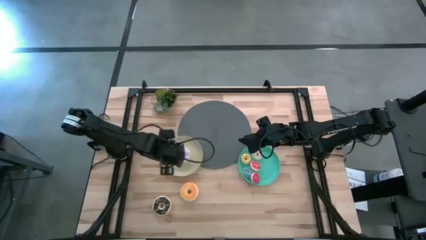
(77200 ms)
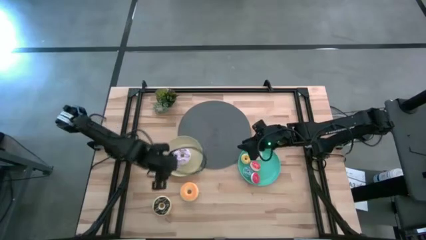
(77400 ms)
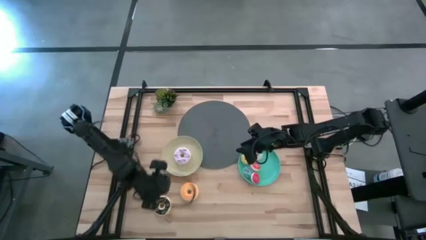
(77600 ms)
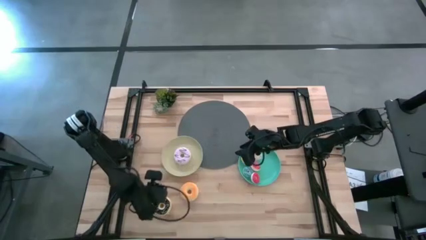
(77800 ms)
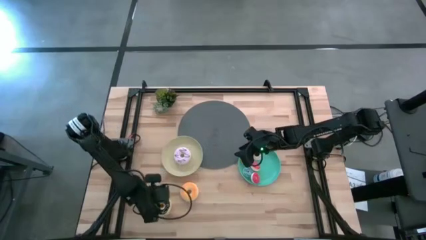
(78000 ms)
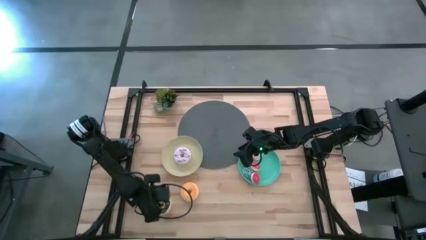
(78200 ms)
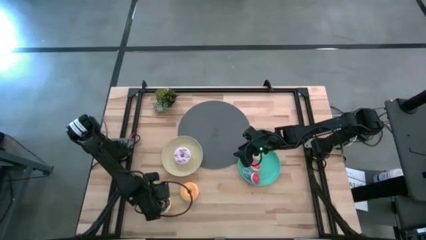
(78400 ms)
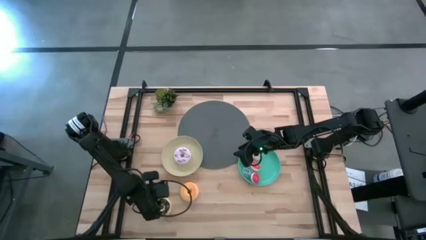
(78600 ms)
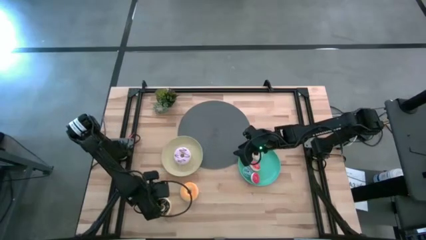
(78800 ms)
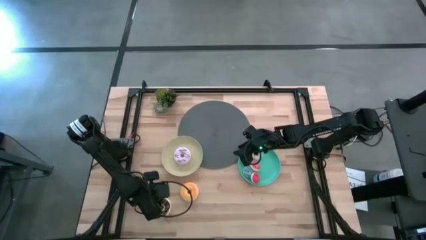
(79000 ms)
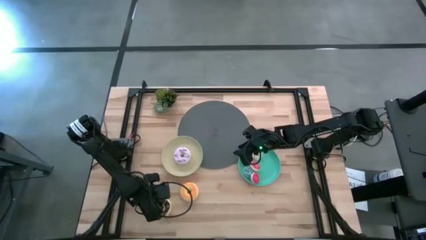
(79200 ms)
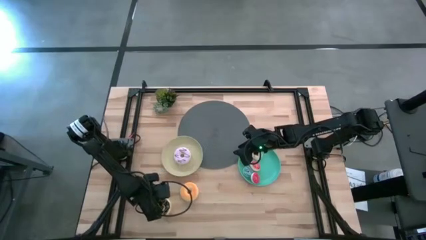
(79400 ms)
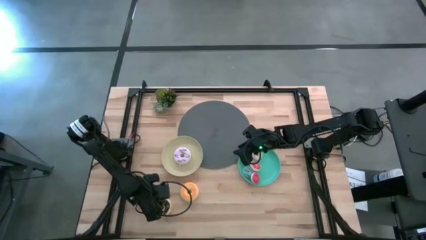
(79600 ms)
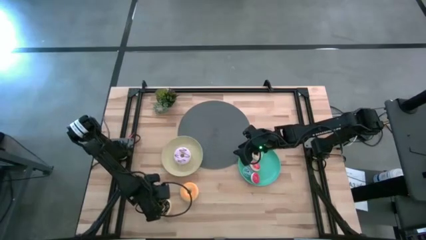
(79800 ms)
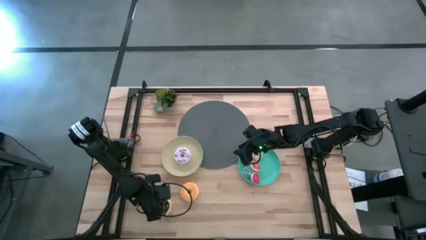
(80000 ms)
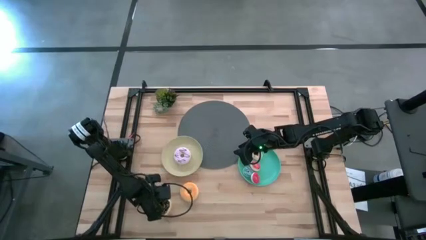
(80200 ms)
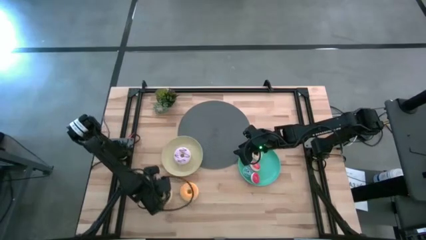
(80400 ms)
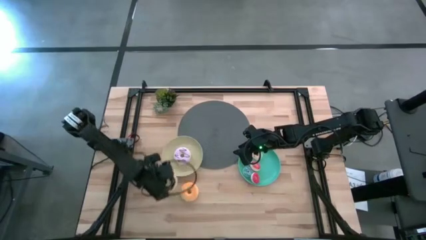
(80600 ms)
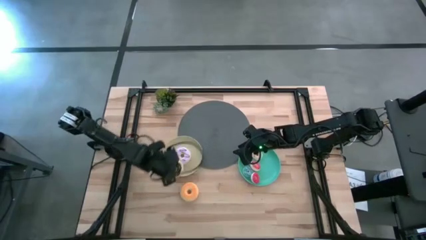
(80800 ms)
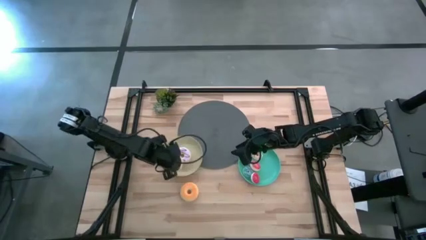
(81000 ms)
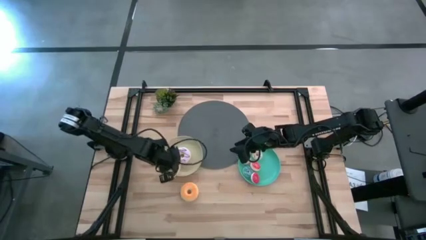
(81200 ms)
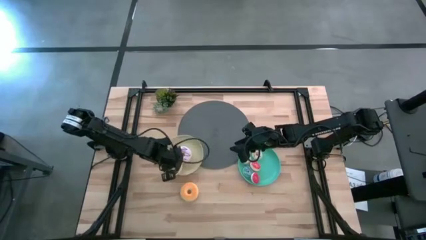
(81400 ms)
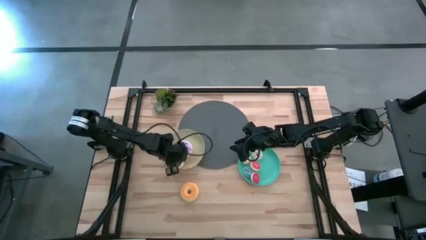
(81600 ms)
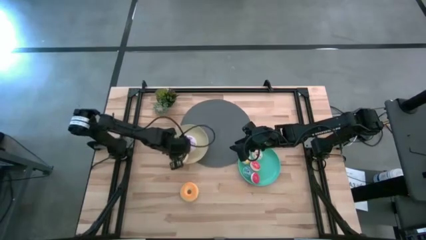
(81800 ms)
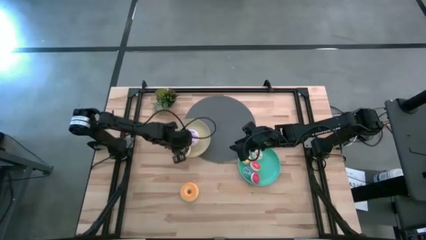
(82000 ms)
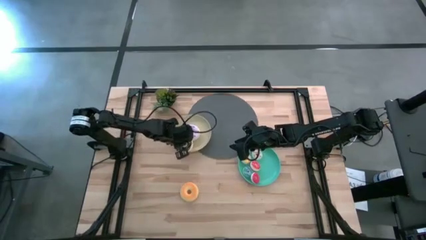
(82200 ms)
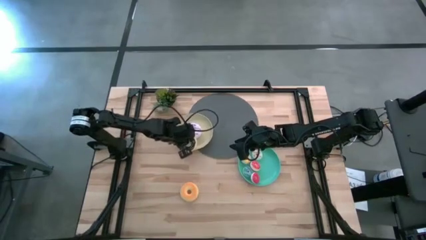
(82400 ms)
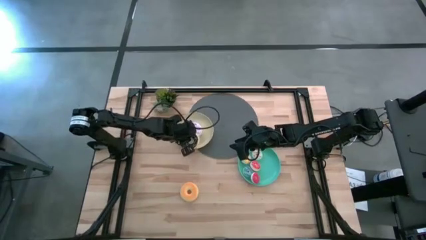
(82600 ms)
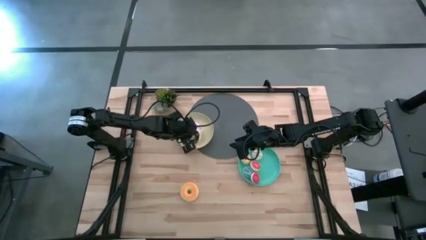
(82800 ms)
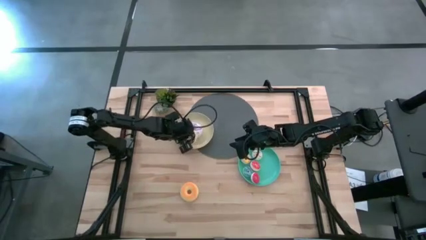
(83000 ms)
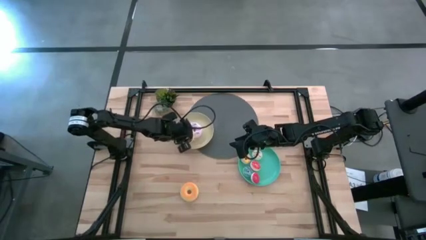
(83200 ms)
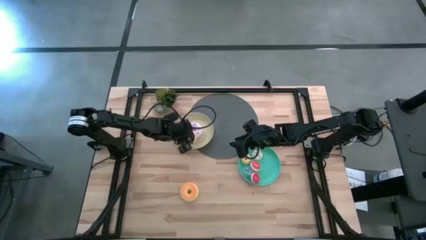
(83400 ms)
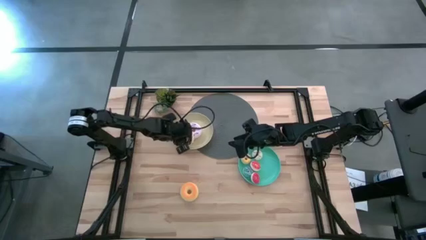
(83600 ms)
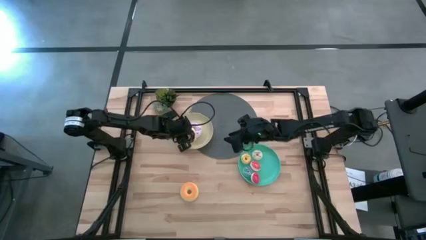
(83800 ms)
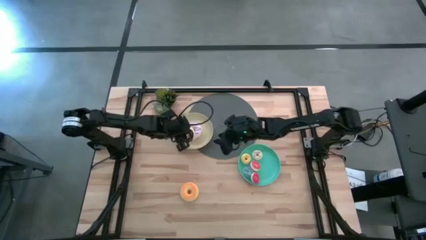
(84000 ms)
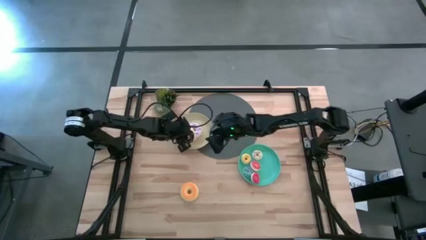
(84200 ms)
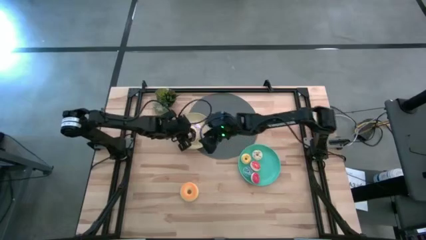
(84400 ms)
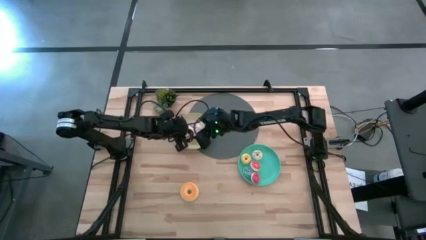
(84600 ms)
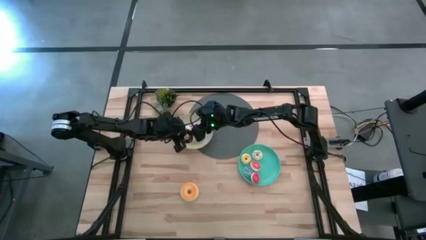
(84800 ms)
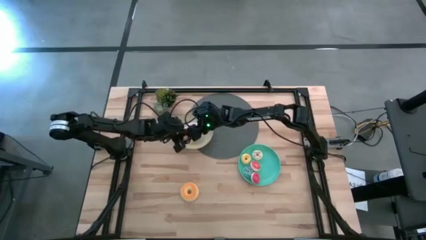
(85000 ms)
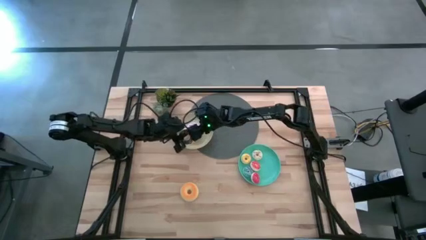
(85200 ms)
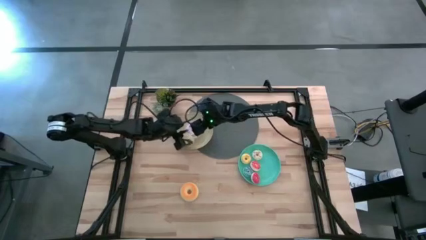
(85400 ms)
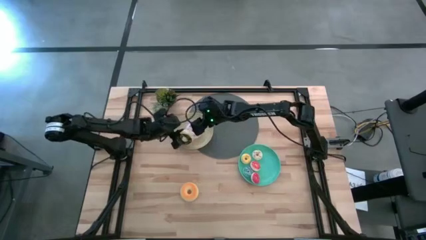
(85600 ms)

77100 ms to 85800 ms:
Task: Pick & Place donuts
Put the large black donut on the brown plate

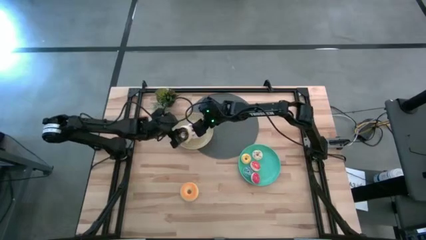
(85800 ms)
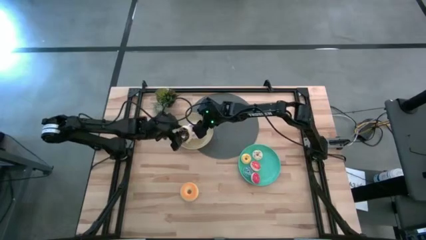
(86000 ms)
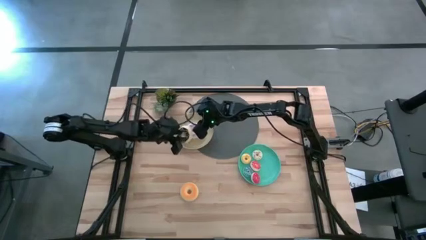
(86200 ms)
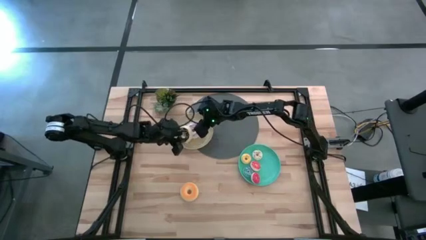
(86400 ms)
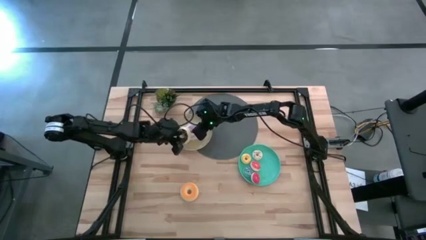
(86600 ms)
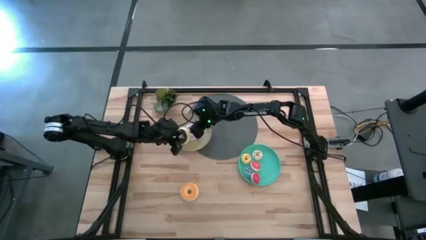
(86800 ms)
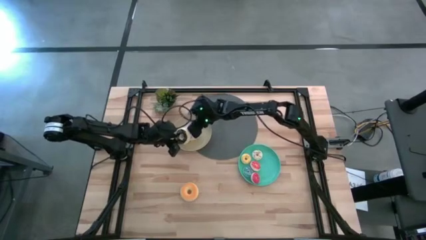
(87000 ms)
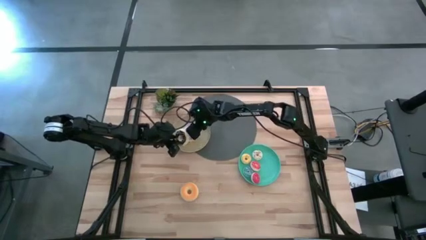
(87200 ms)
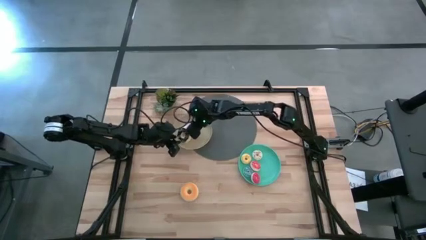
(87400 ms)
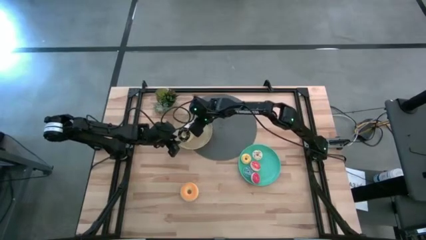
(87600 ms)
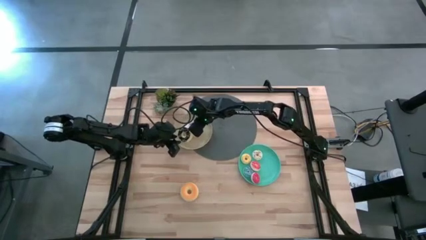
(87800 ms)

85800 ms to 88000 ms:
Adjust the large purple donut on the brown plate

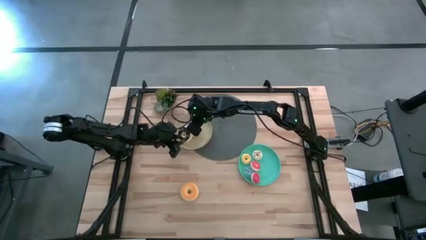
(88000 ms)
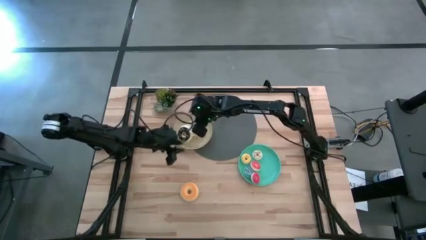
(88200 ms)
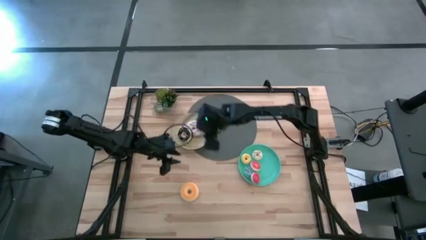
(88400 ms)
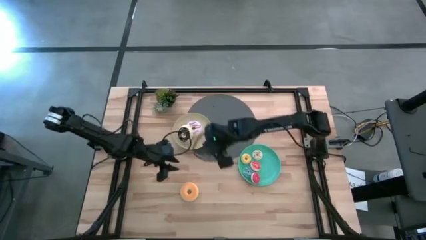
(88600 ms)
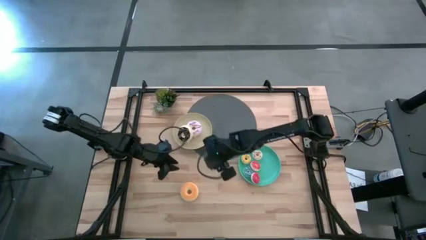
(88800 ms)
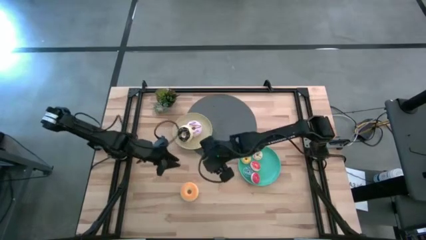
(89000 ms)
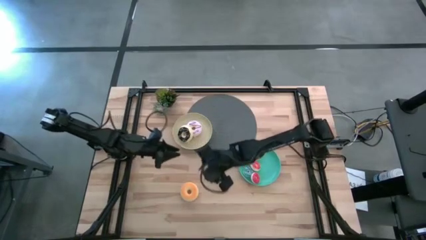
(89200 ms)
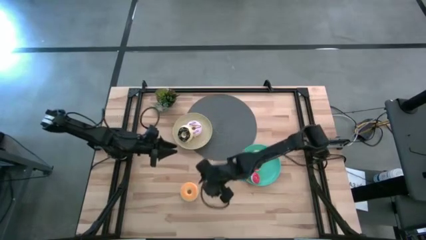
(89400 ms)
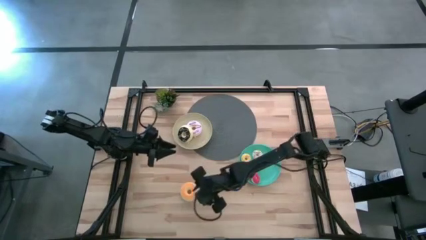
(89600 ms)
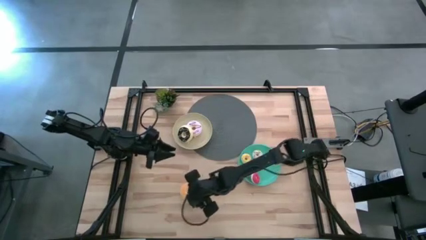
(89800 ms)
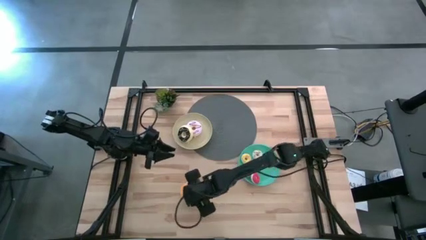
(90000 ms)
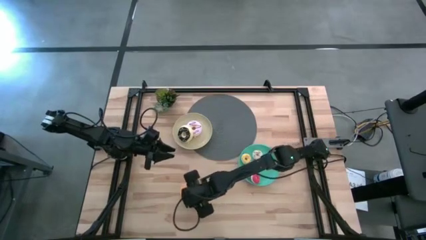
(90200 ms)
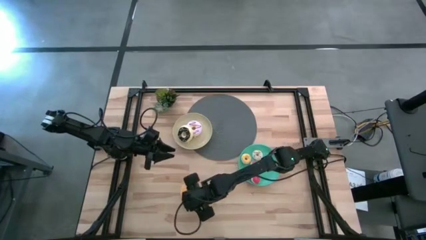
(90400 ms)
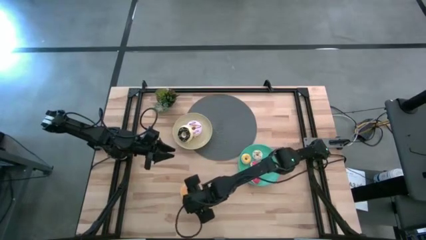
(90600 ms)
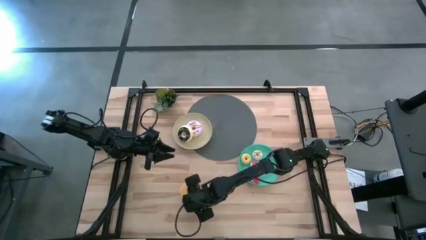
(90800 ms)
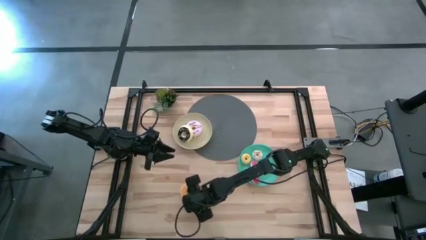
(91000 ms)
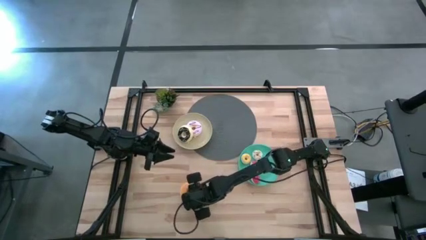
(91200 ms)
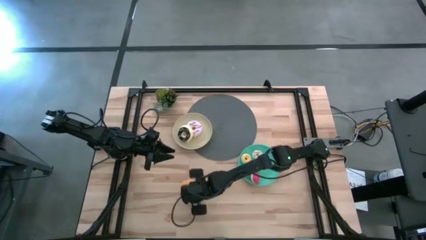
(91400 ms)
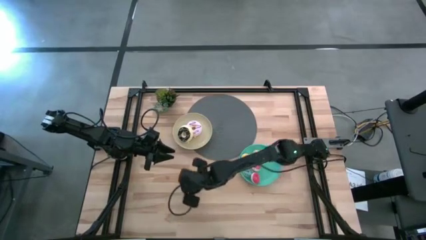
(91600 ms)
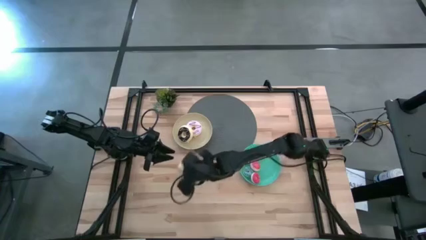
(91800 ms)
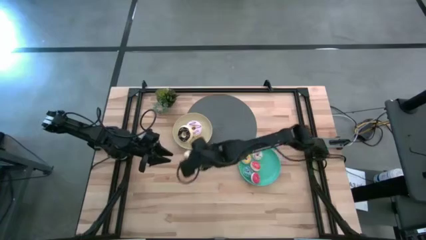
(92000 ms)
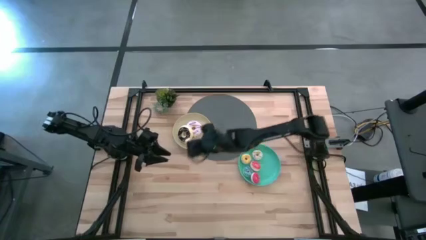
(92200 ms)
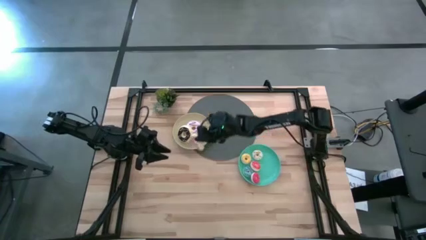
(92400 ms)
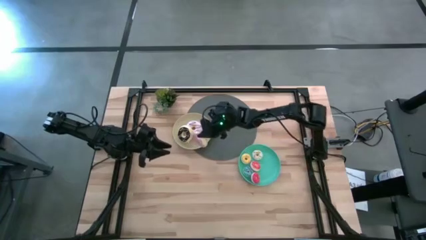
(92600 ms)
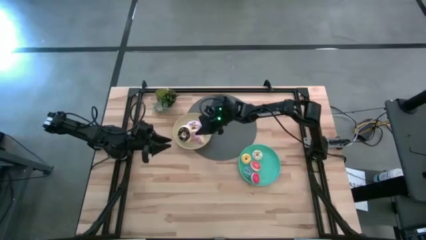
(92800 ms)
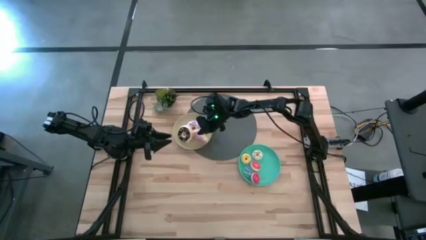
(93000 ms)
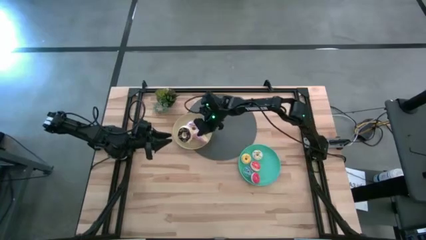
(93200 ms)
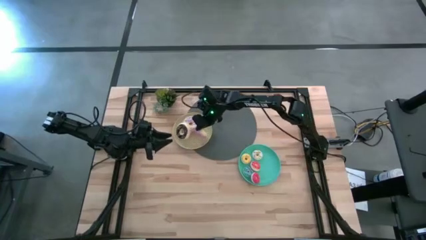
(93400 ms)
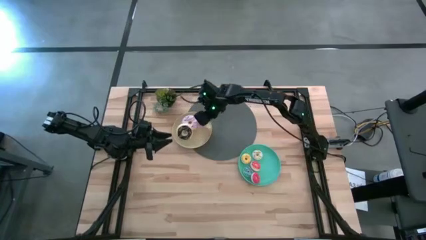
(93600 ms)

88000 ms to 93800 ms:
Put the large pink donut on the brown plate
